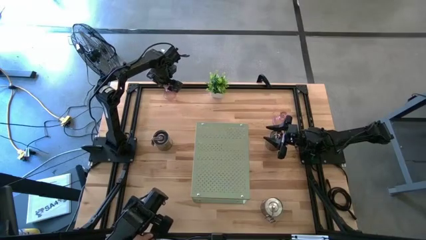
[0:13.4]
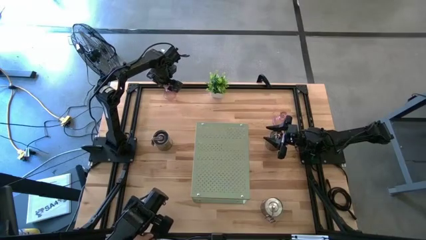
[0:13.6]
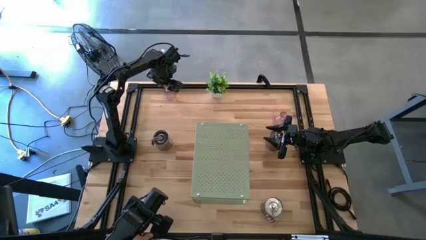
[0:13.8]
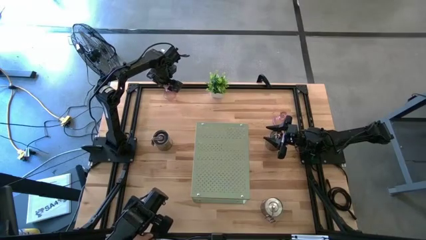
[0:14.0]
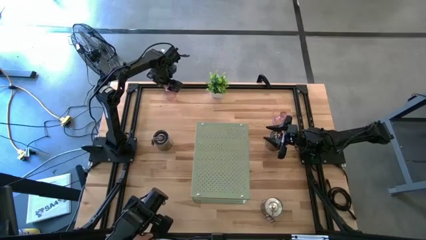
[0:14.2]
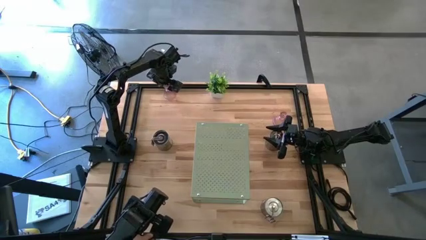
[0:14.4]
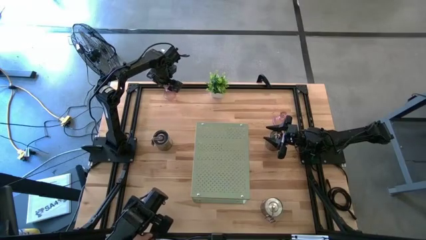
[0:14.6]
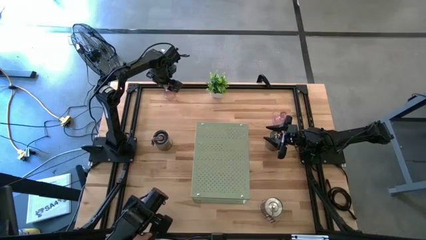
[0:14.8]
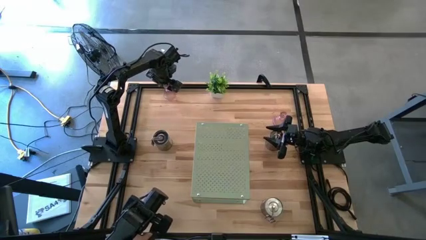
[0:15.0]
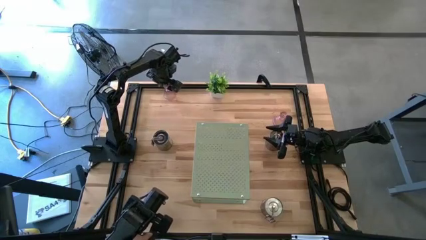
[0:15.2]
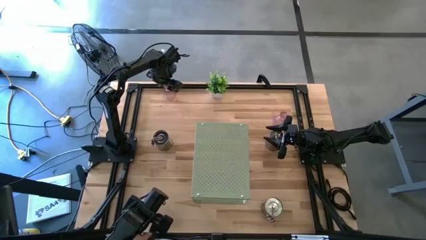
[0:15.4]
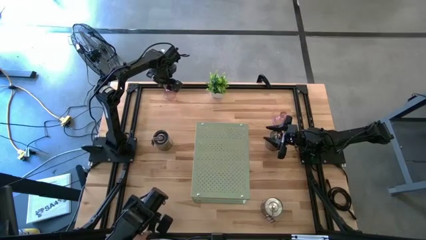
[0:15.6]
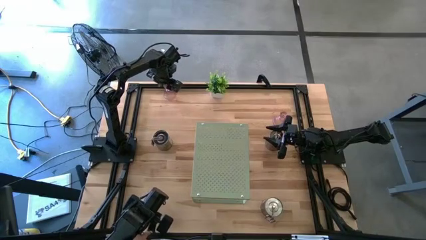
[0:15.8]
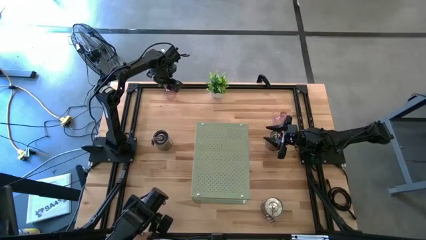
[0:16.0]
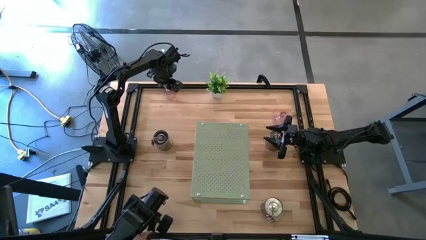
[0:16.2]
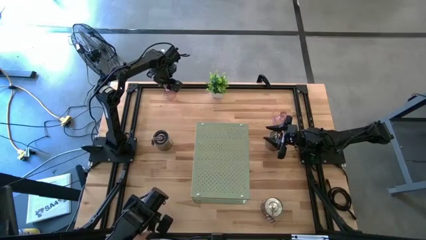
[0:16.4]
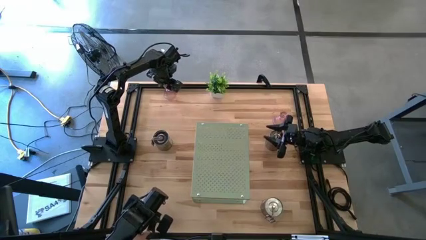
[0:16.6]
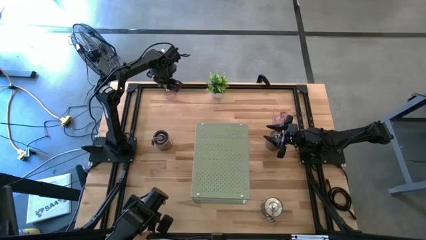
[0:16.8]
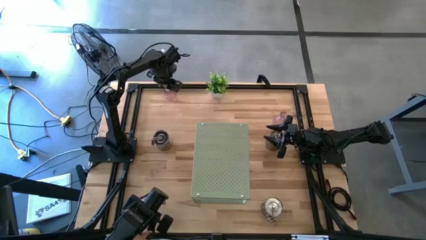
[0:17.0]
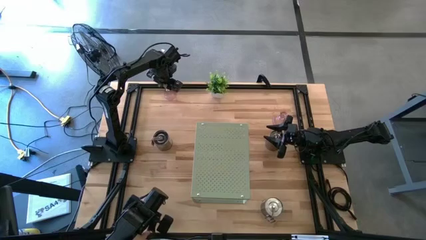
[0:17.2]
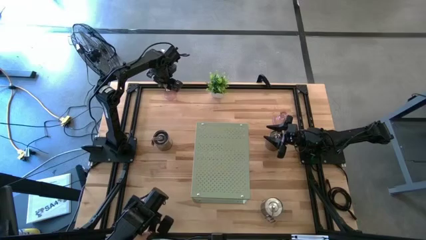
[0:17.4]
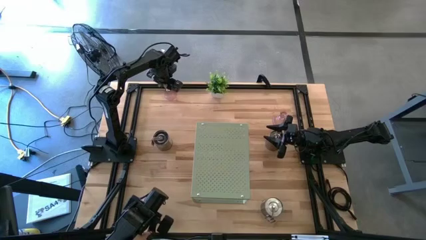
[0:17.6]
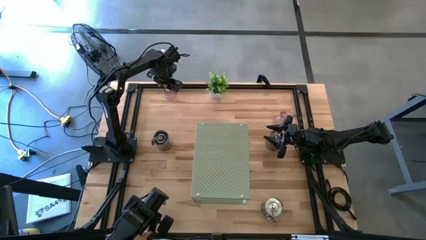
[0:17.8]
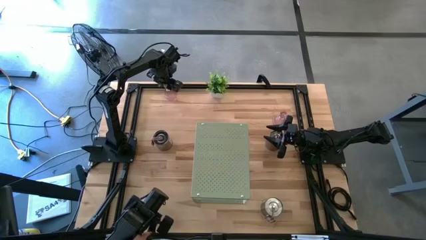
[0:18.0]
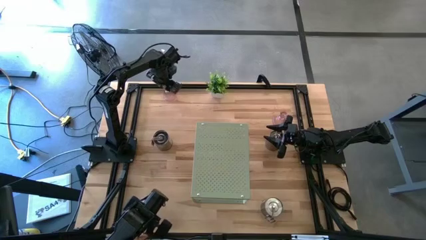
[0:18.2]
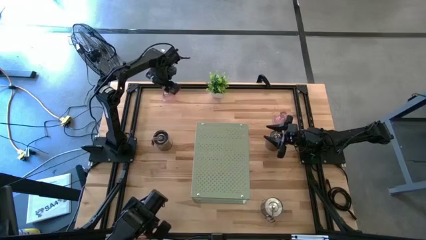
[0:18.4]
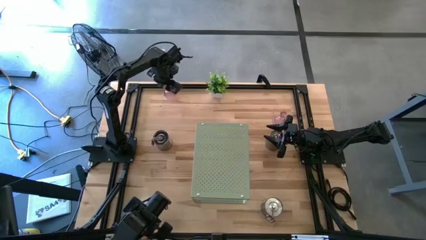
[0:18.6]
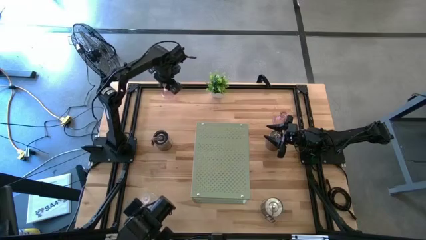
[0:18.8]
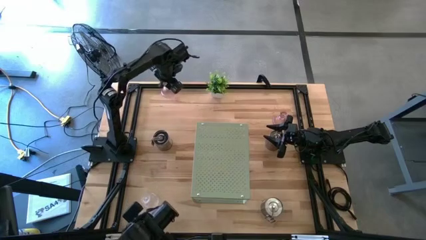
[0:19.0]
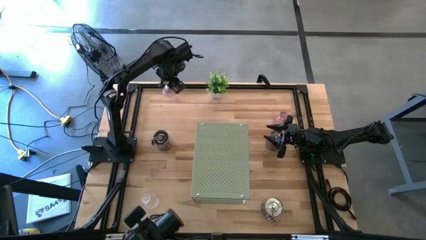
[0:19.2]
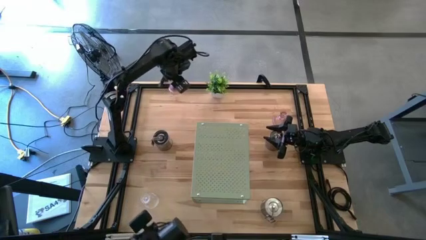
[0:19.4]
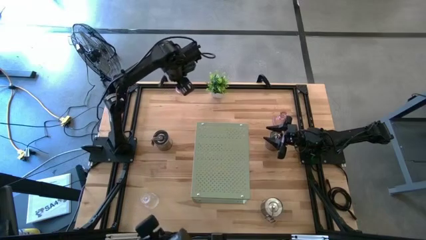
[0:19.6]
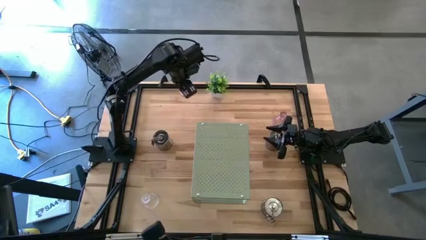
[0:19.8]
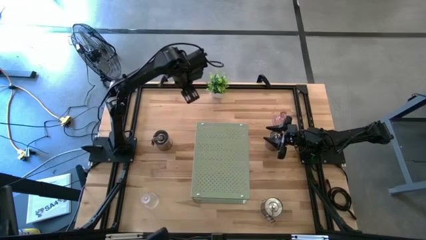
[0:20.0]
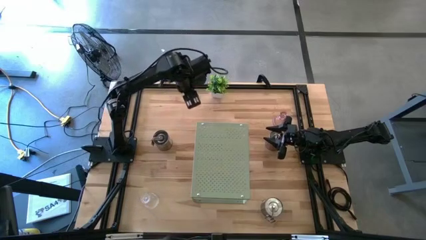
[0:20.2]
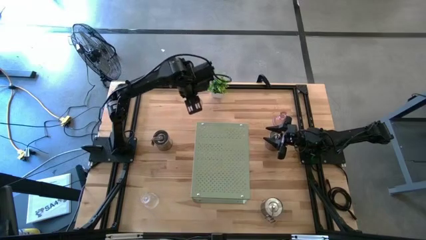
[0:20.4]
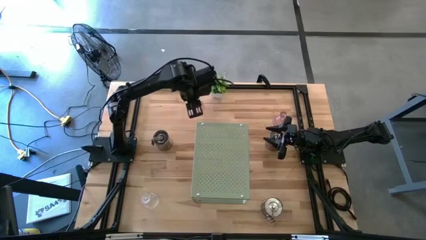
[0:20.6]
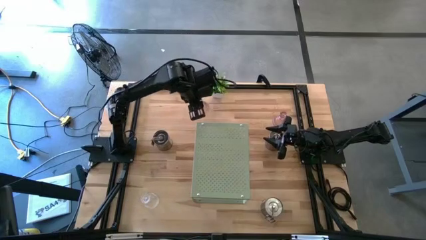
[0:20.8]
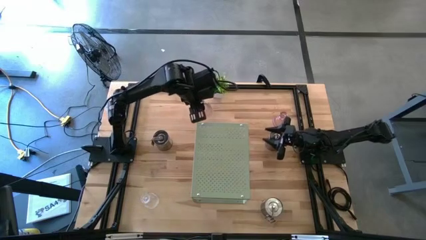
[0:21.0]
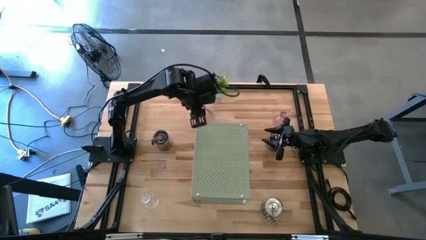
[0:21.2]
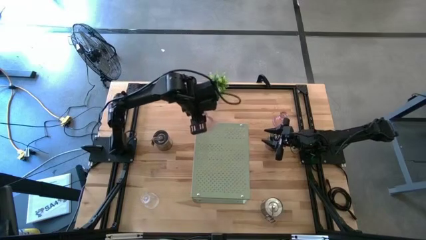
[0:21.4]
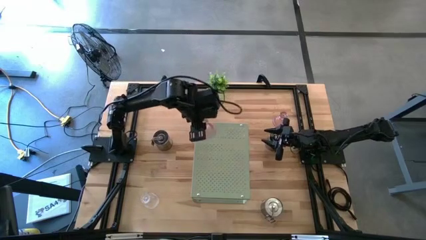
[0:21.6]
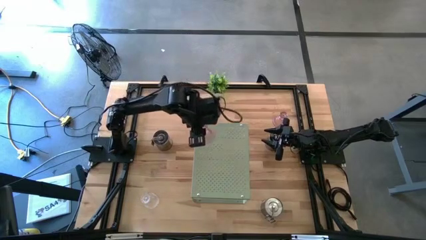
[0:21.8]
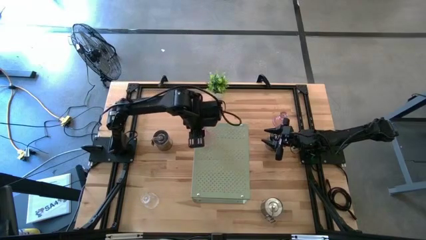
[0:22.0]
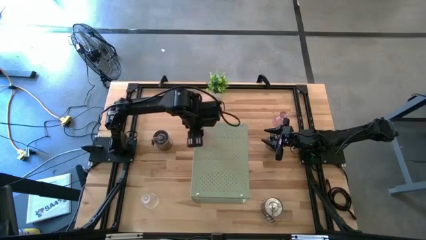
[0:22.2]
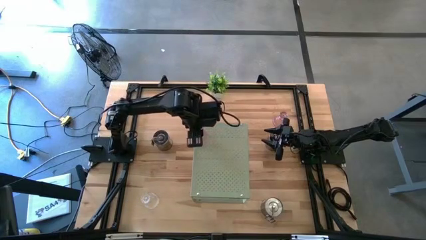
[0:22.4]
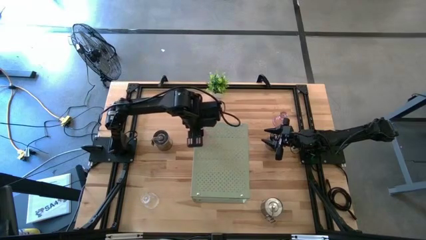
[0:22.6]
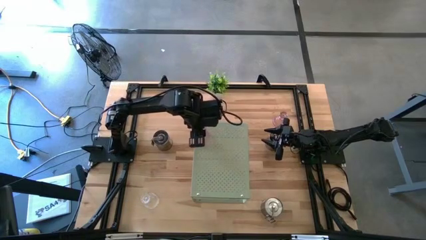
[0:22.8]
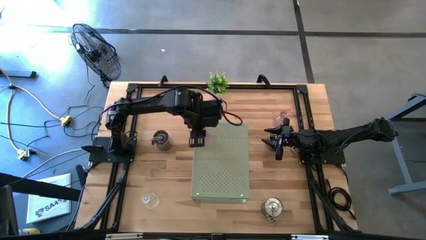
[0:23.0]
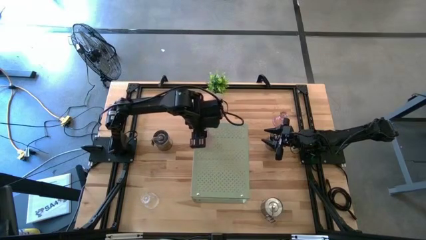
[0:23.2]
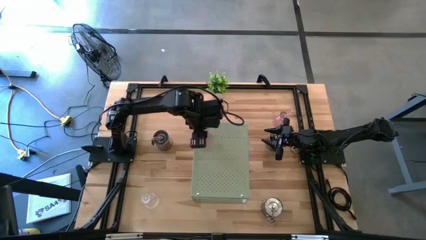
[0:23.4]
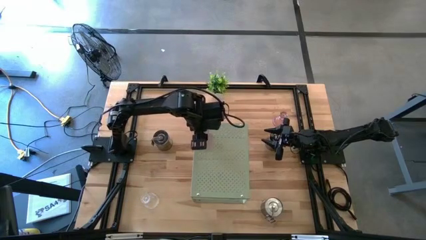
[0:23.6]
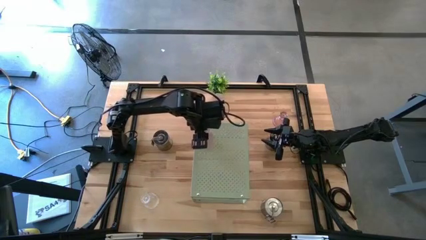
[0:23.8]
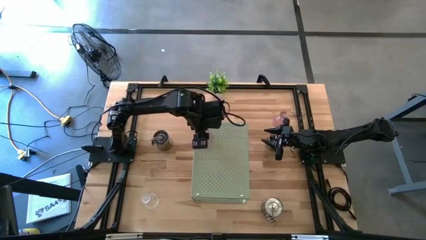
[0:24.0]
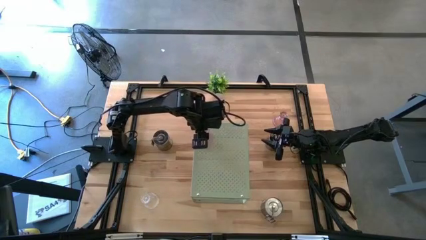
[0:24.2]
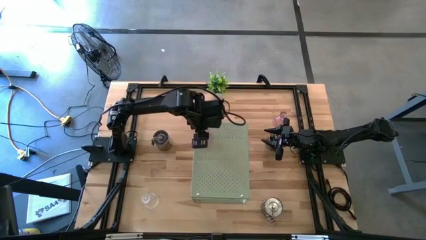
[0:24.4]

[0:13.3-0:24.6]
Task: Pick & Place candle stick holders
Put the top pink transparent candle holder on the shelf
